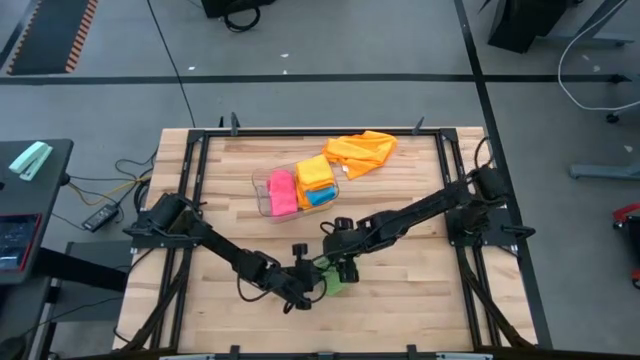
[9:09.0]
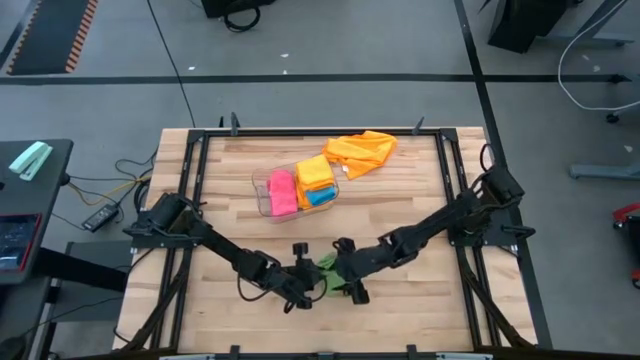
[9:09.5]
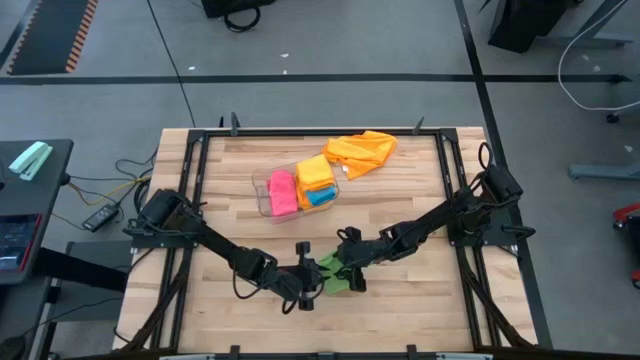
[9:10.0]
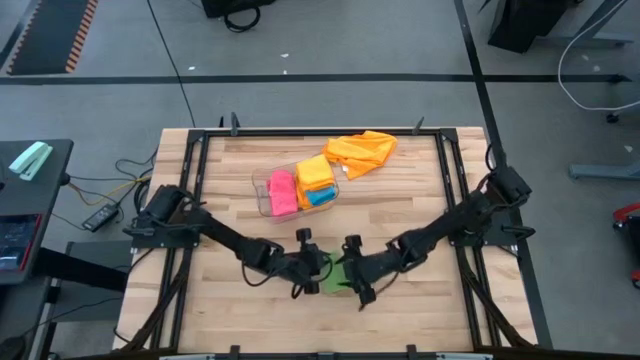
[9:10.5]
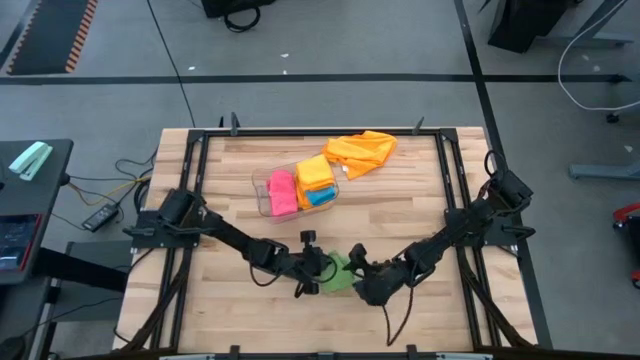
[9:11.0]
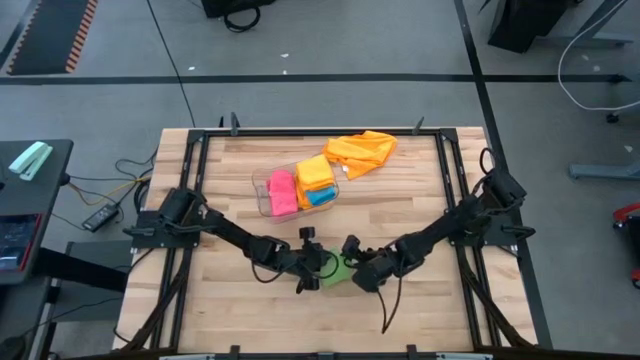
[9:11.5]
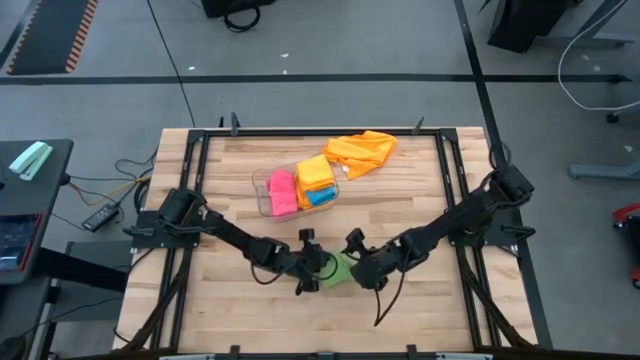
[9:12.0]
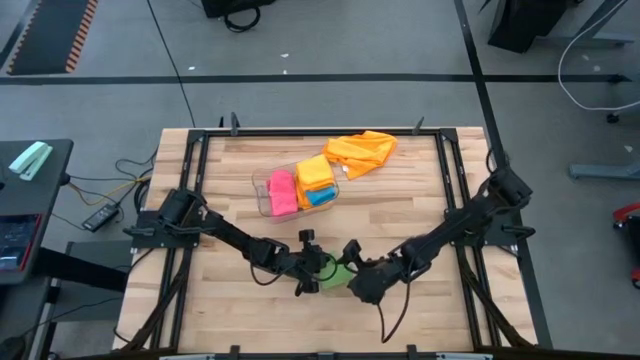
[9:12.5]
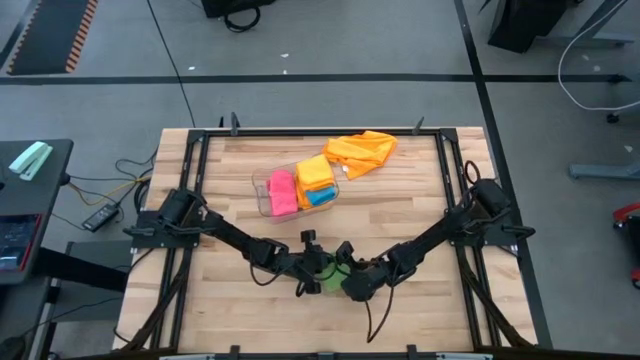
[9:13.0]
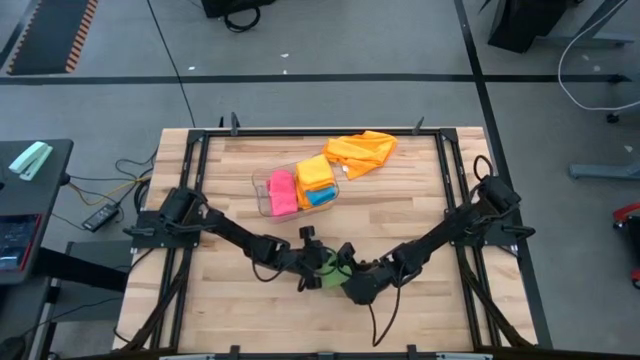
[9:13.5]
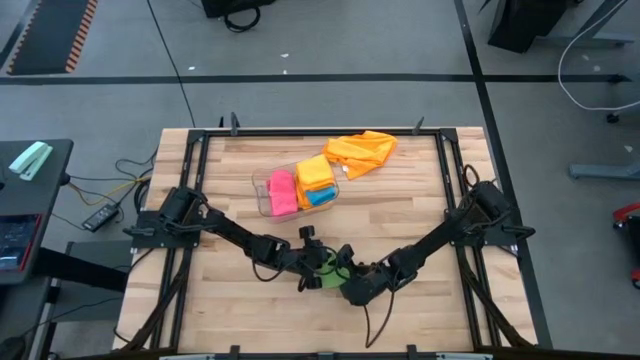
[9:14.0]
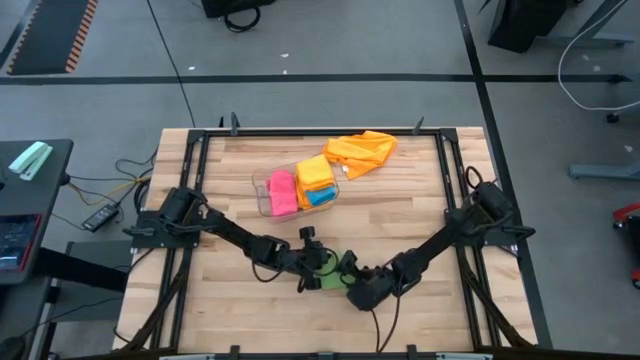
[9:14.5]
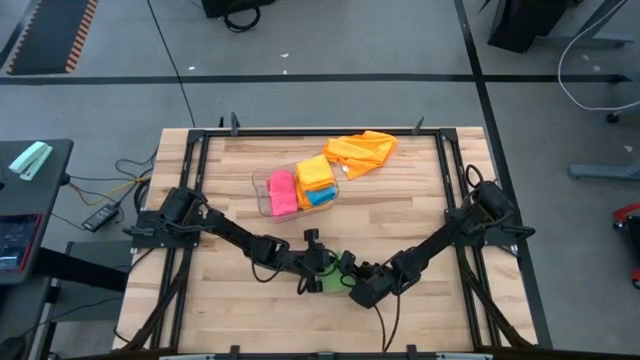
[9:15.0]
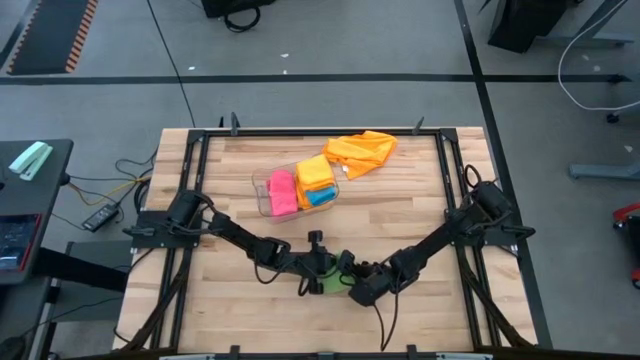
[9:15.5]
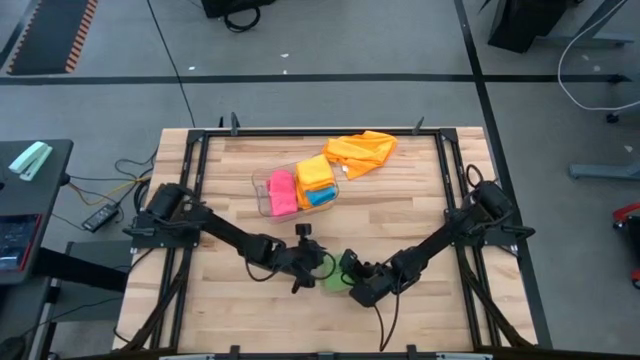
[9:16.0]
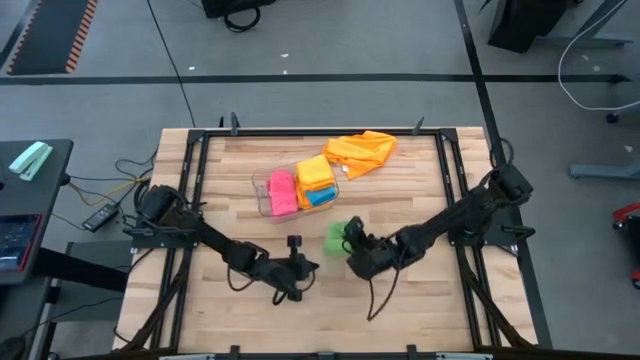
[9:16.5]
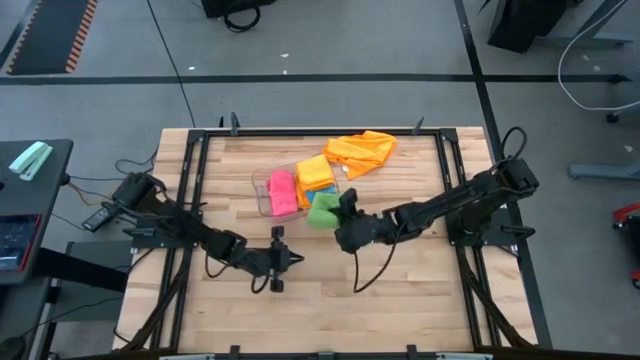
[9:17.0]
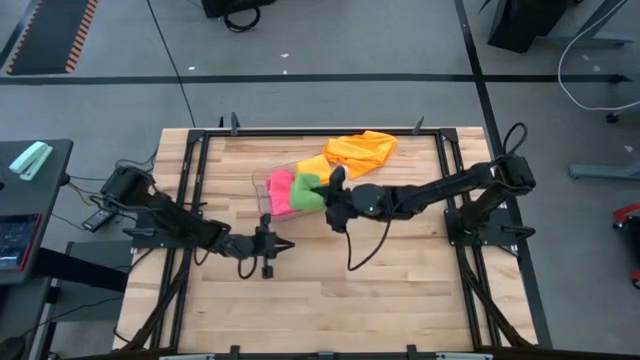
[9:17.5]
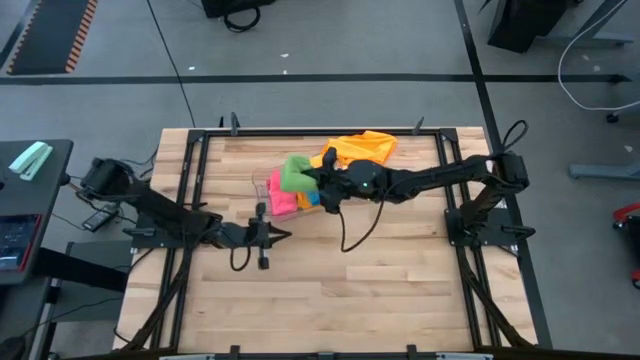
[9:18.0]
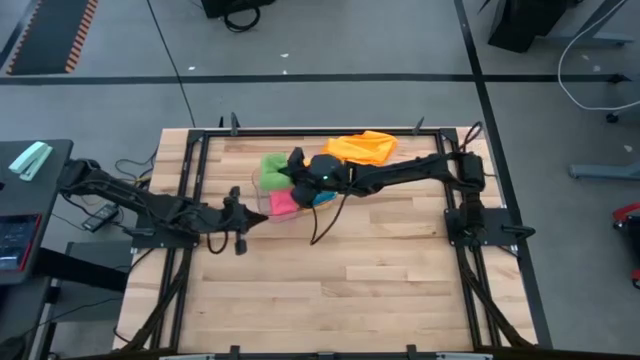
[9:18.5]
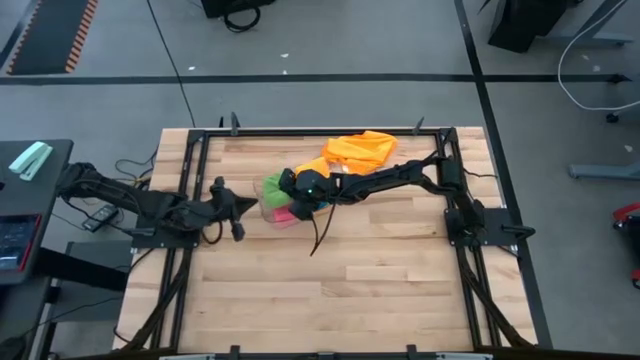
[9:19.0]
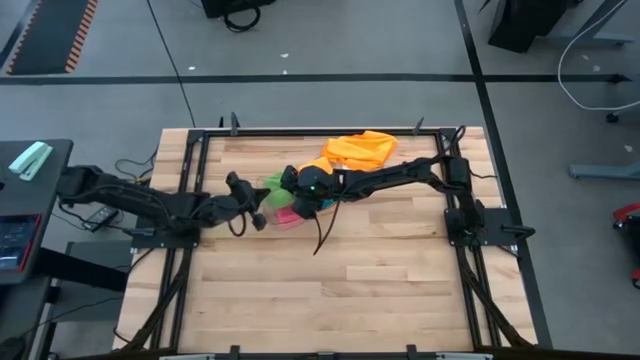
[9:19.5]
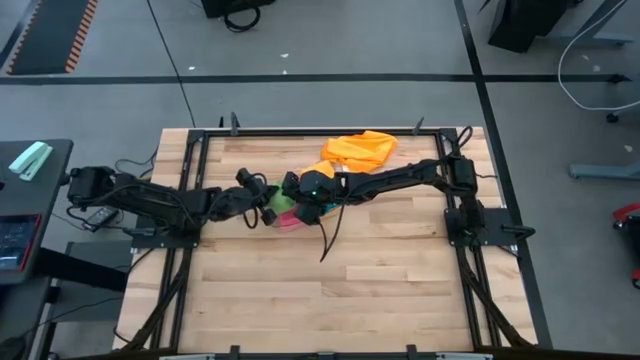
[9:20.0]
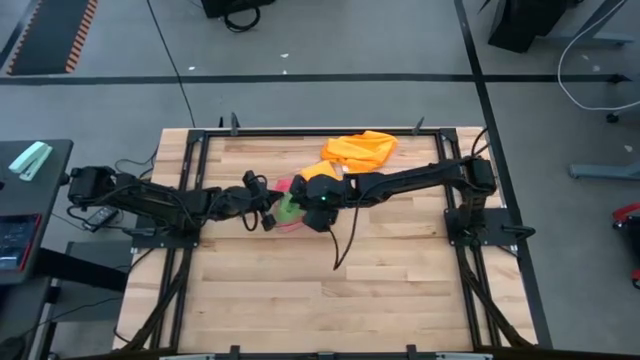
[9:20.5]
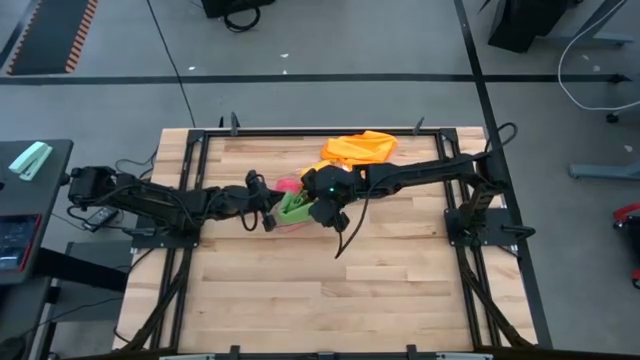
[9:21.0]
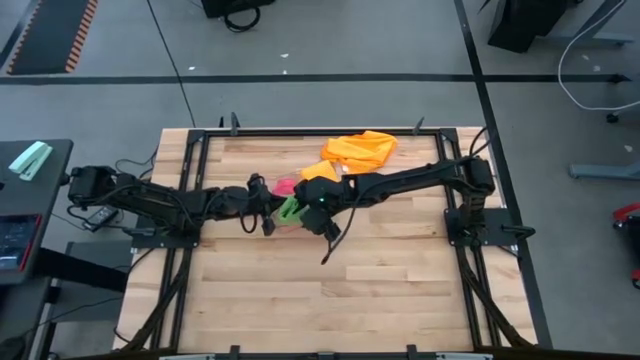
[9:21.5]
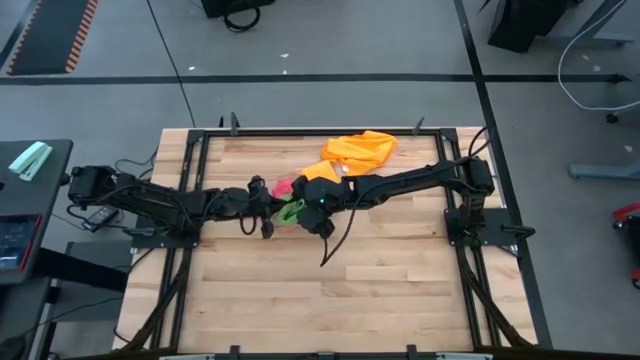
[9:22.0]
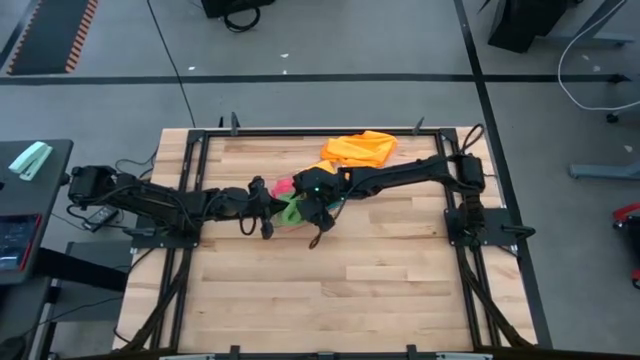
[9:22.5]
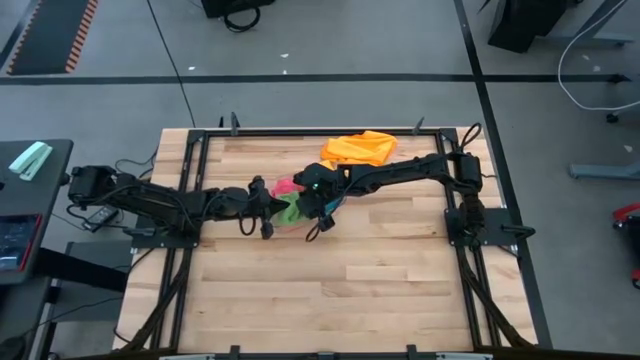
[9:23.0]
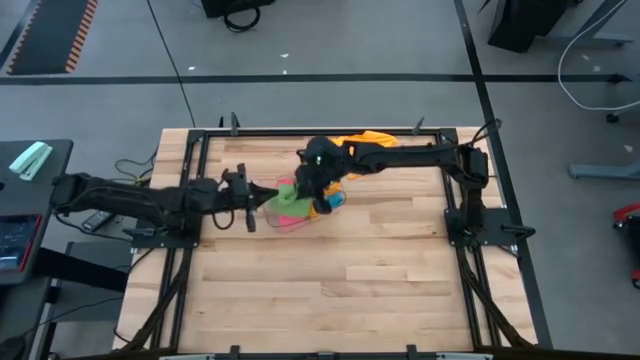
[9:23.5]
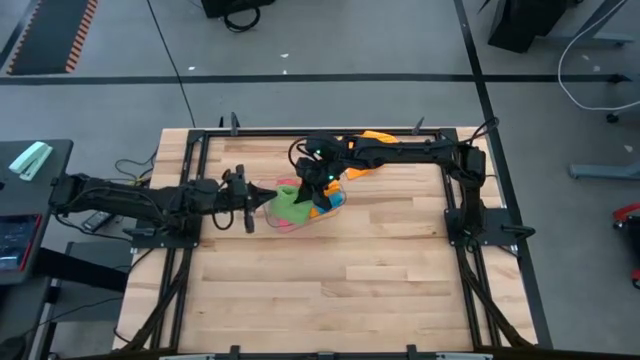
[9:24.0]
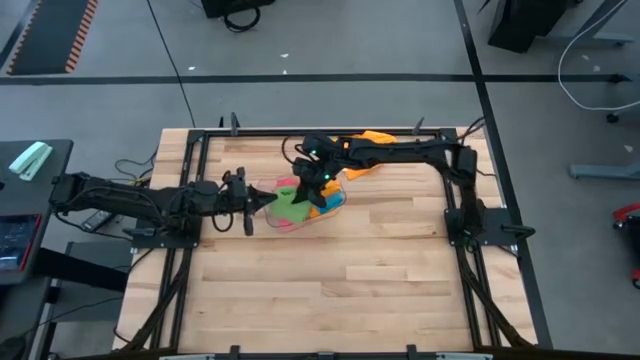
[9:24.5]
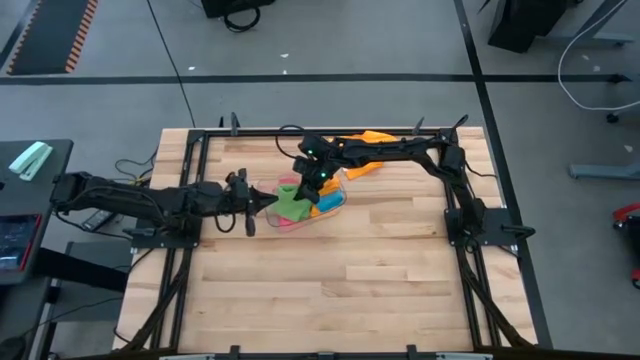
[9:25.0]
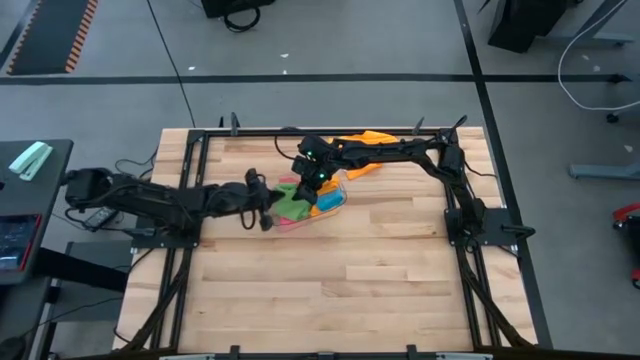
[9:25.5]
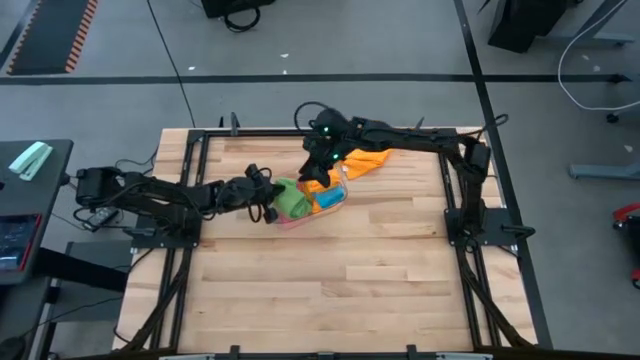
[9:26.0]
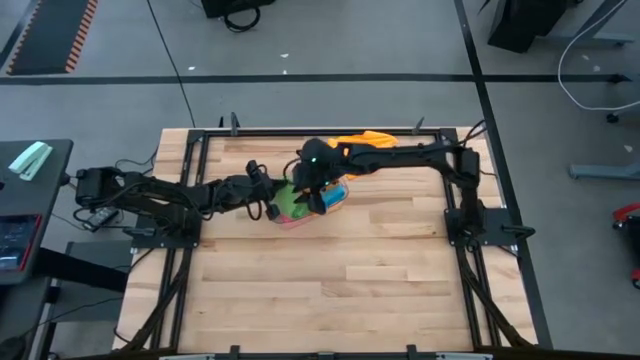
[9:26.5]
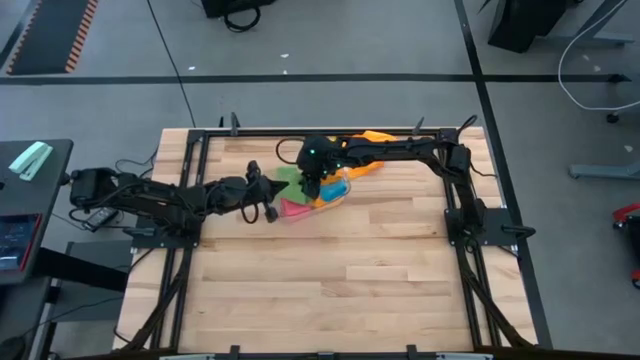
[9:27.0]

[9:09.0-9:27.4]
Task: Fold microfiber towels
Put the folded green microfiber cloth into the transparent bin
